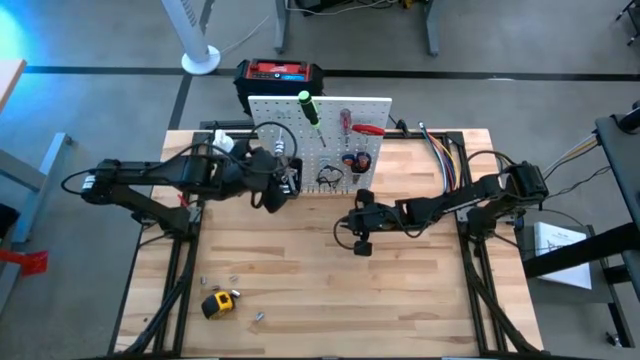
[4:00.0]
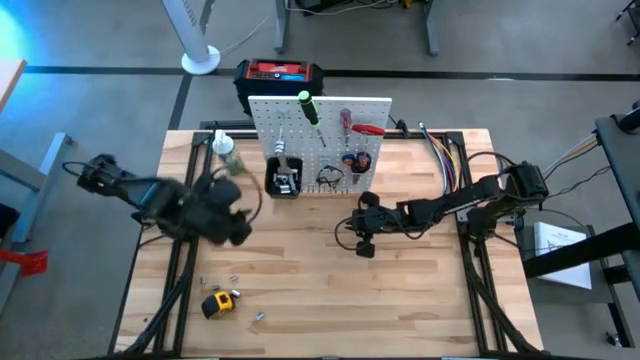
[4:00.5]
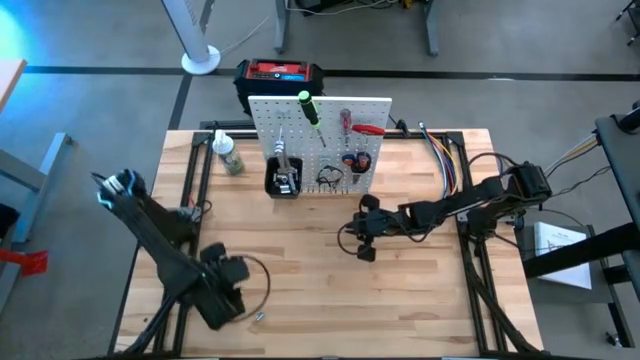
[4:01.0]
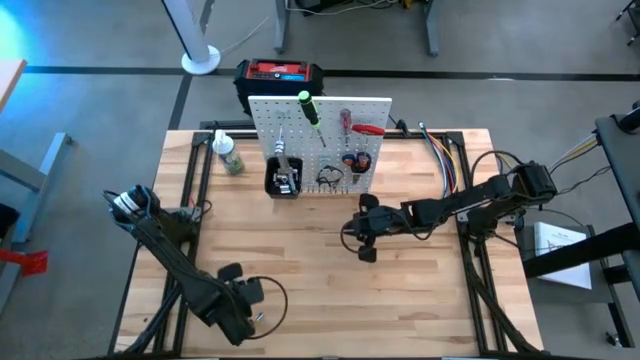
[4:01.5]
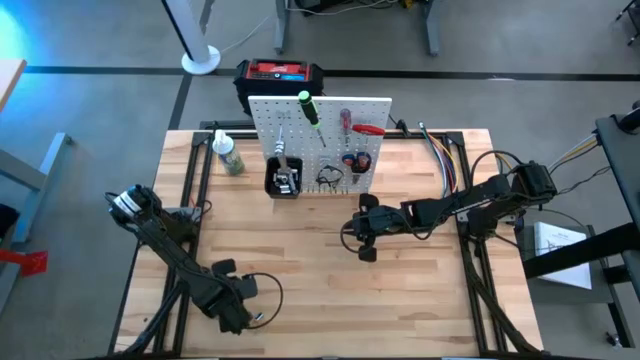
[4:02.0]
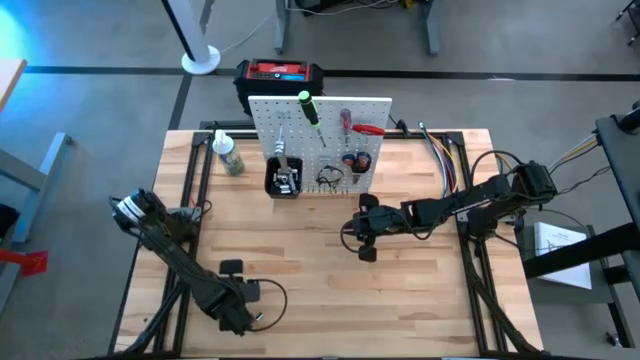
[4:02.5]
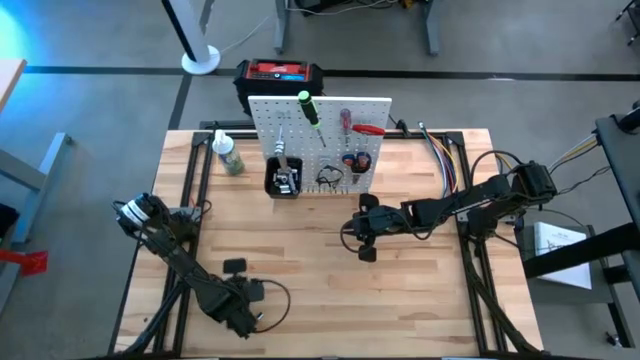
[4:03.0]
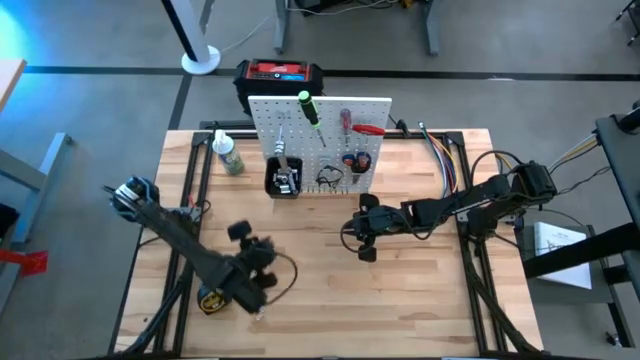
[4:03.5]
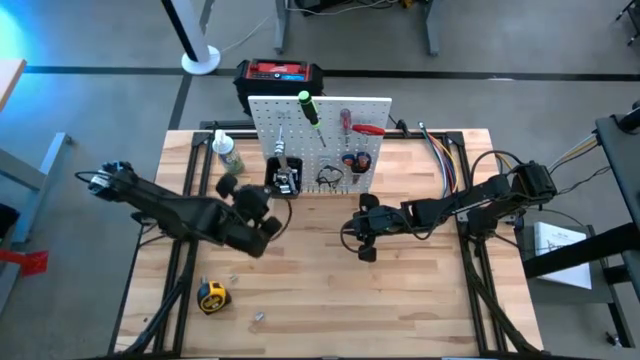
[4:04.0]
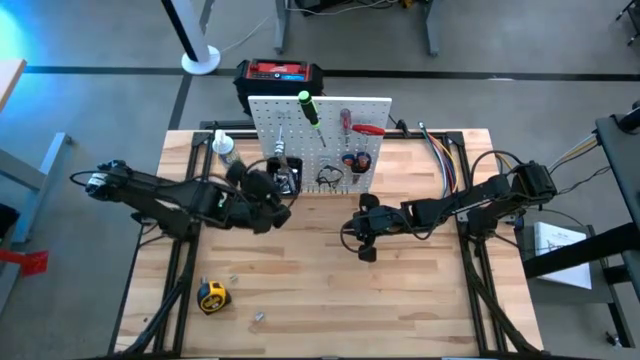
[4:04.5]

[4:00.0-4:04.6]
Task: Hang tools onto peg board
Put the silver socket into the black bin on the pegboard

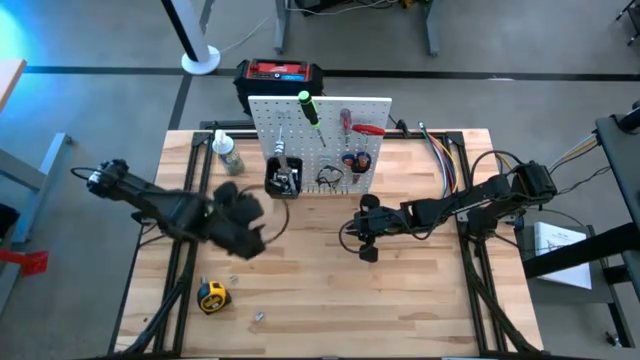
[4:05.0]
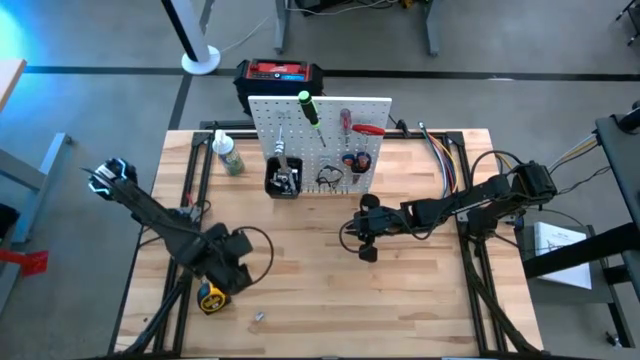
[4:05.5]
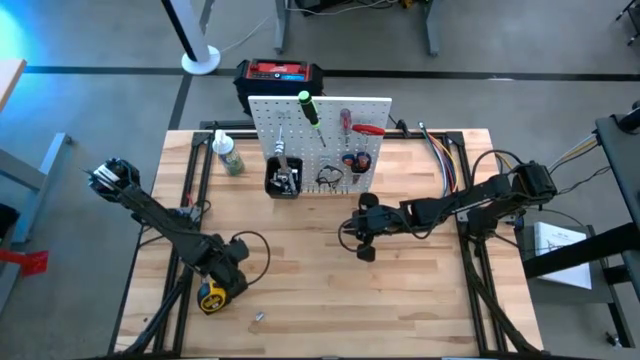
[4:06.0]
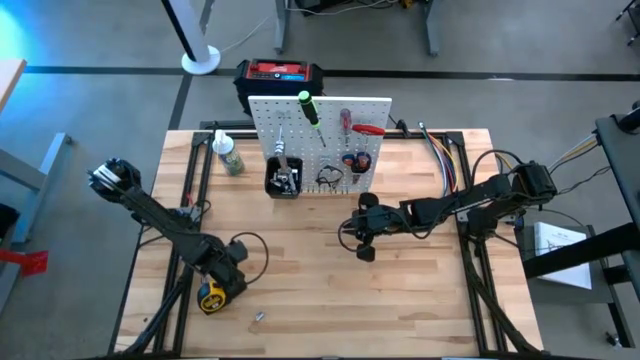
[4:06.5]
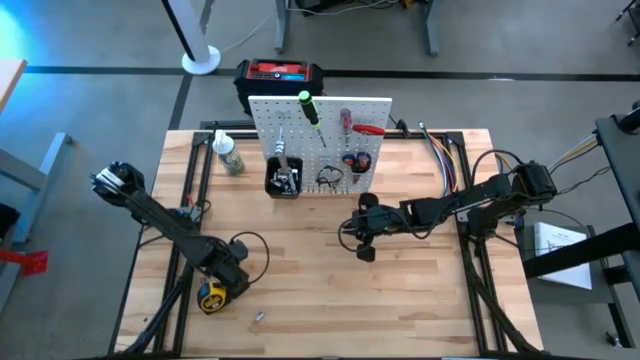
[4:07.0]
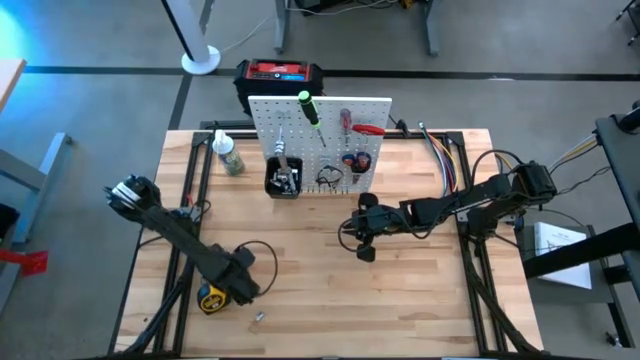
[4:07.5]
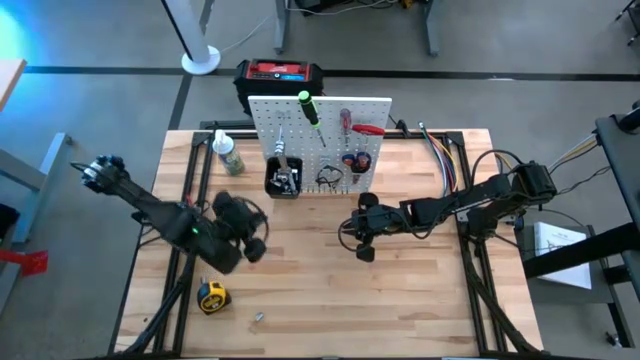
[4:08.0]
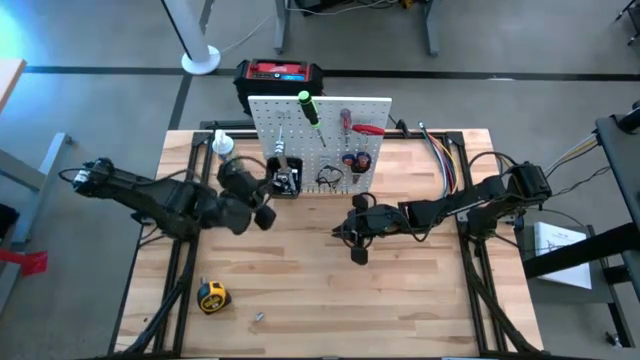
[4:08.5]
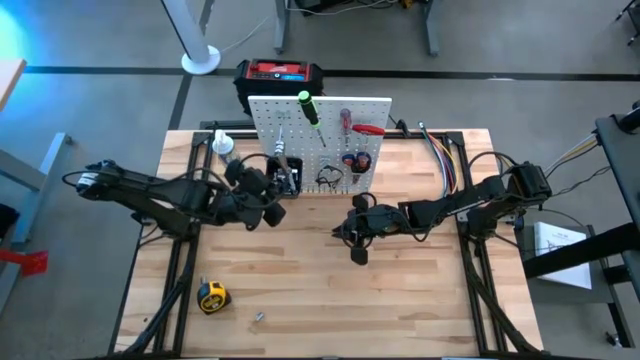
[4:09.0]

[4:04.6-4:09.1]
Put the silver socket into the black bin on the pegboard

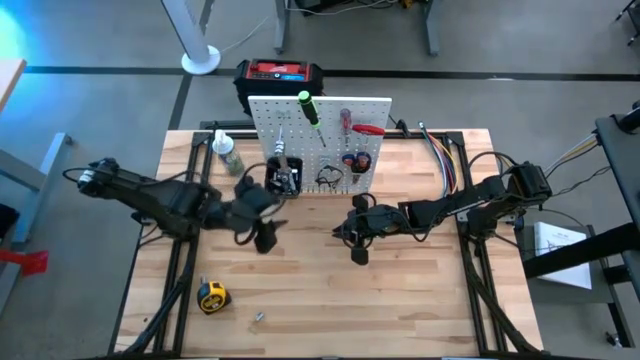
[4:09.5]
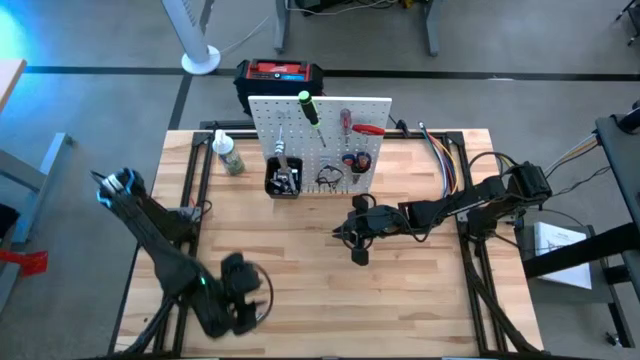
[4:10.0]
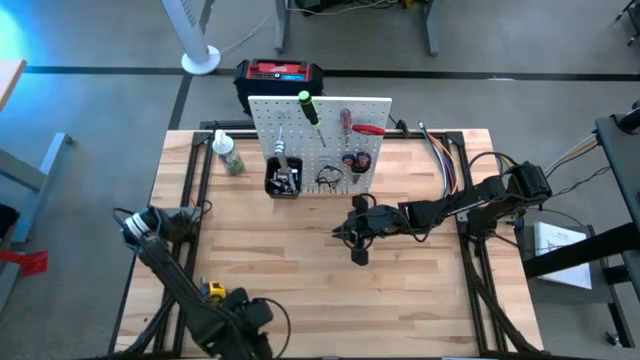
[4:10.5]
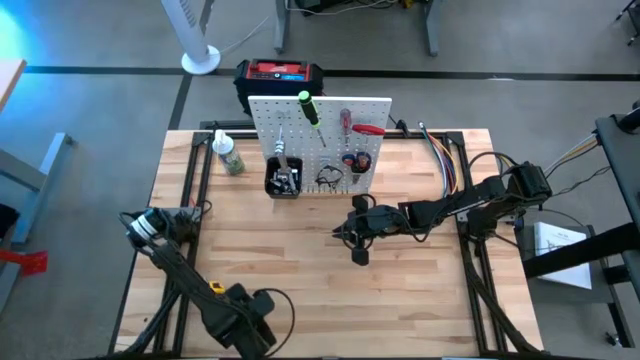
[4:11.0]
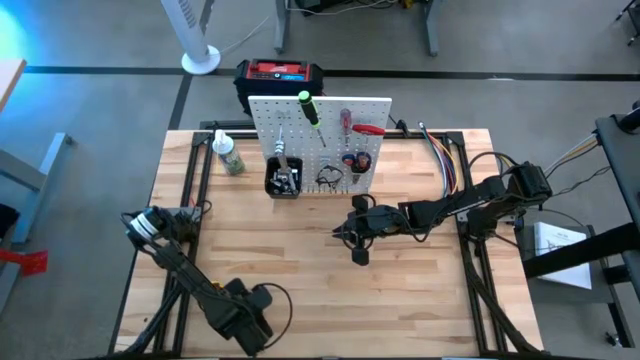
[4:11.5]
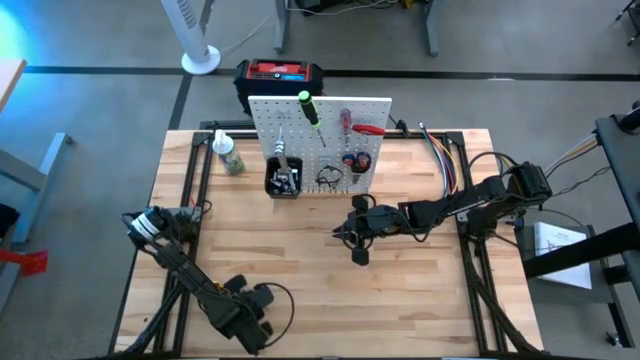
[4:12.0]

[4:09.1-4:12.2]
Put the silver socket into the black bin on the pegboard

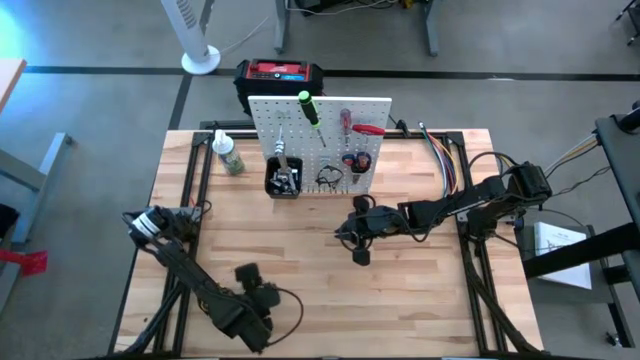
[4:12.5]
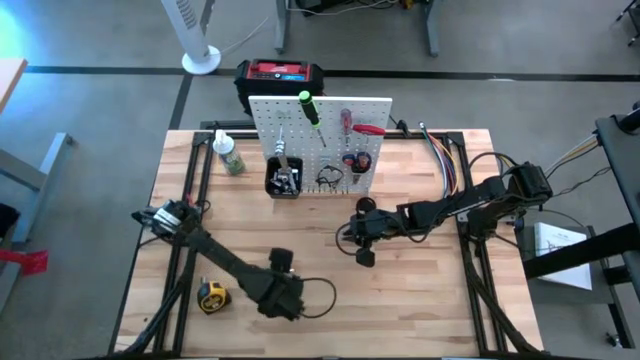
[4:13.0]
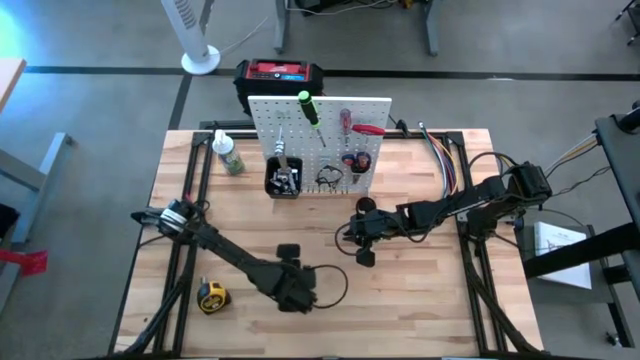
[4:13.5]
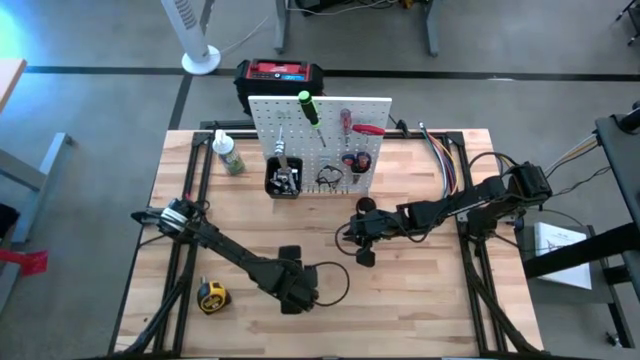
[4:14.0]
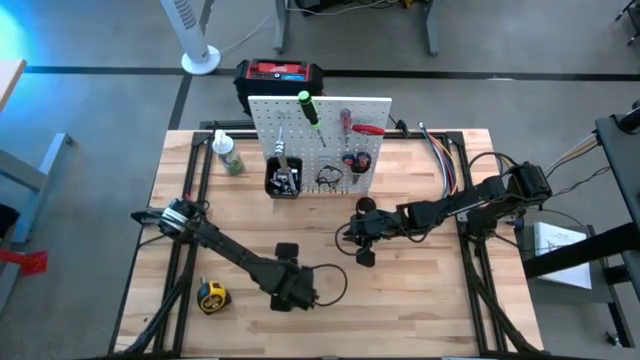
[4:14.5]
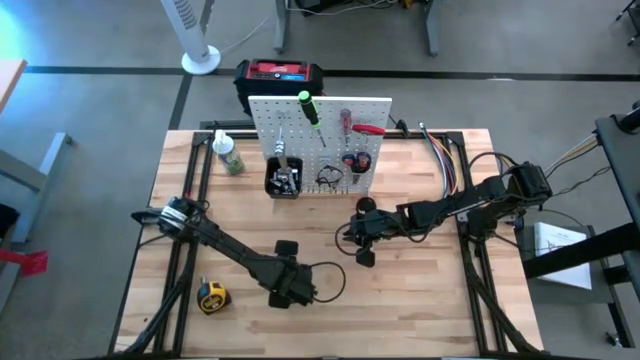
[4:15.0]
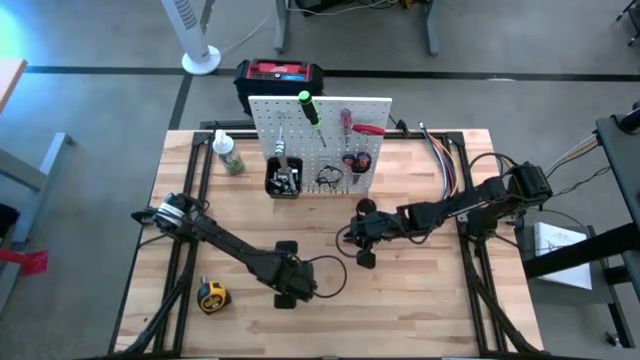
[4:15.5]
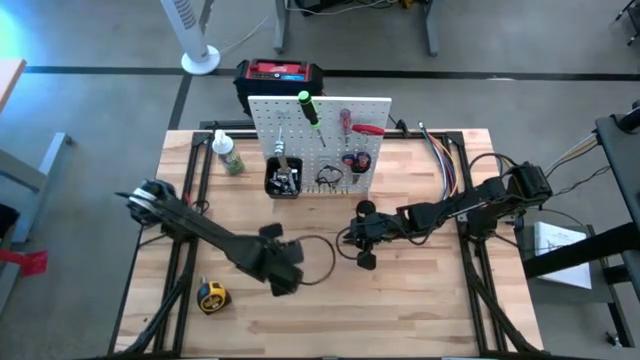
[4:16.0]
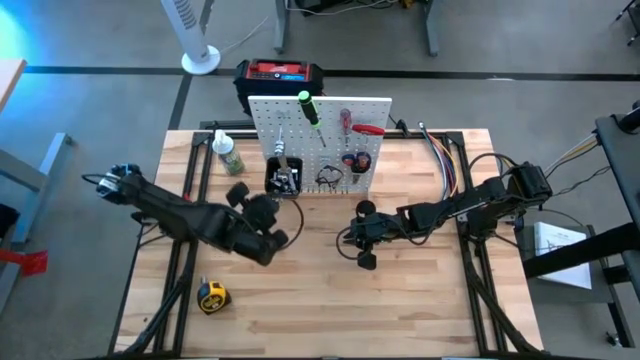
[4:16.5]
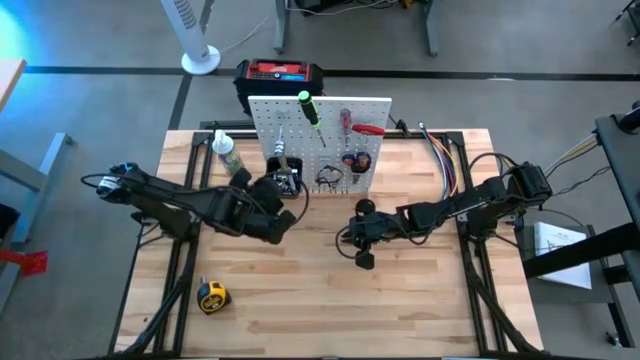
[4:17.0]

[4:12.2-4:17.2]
Put the silver socket into the black bin on the pegboard

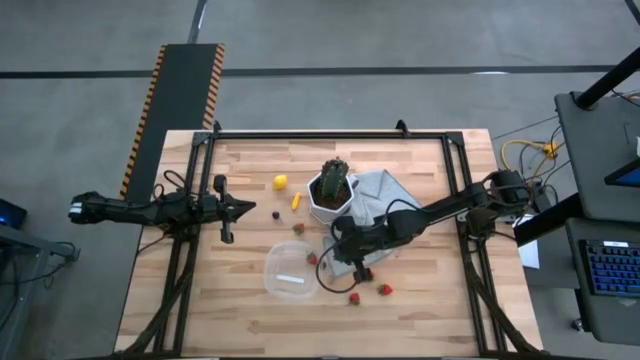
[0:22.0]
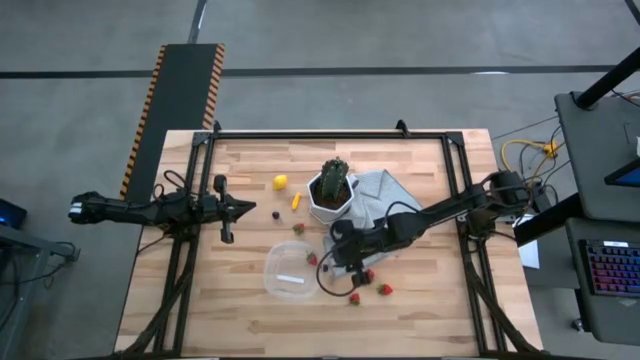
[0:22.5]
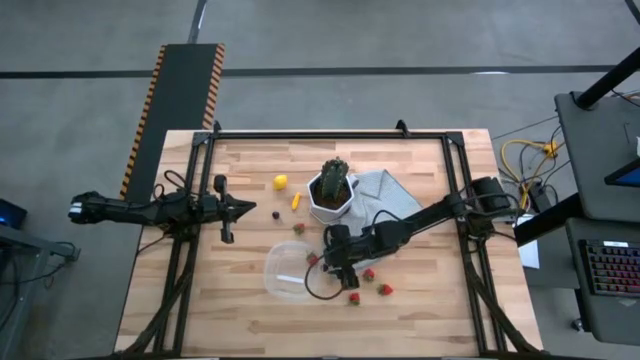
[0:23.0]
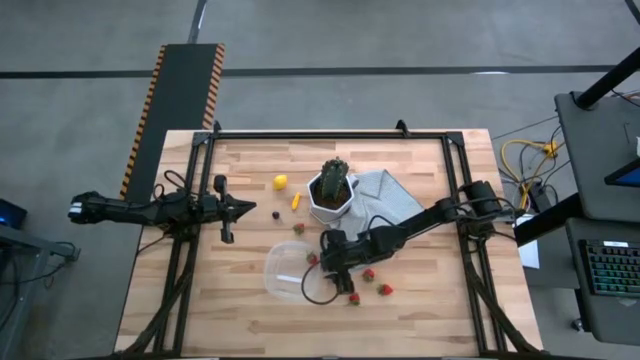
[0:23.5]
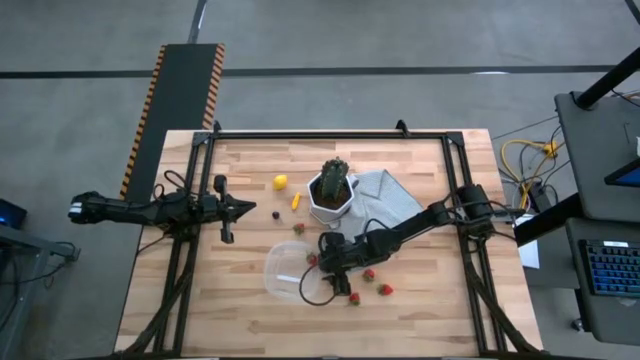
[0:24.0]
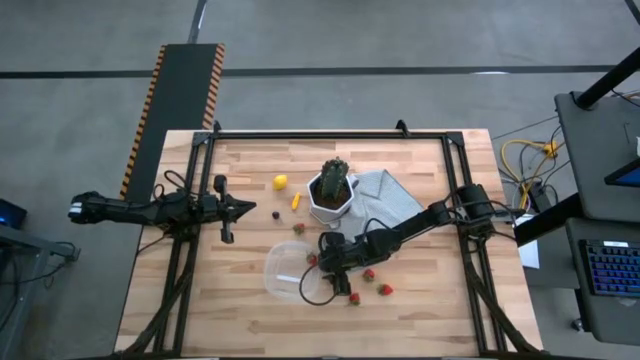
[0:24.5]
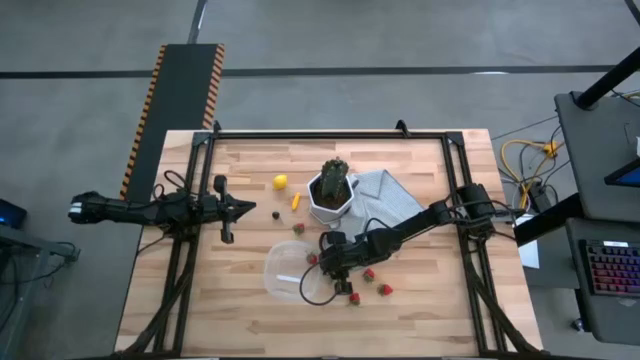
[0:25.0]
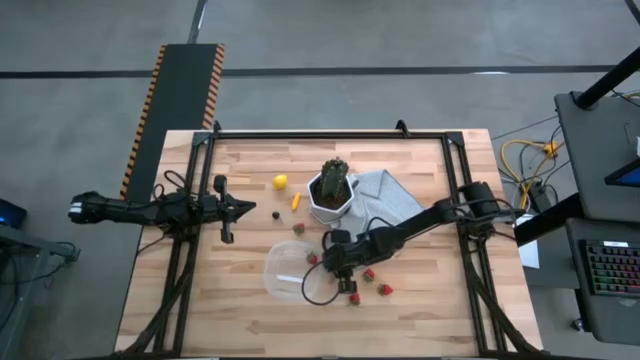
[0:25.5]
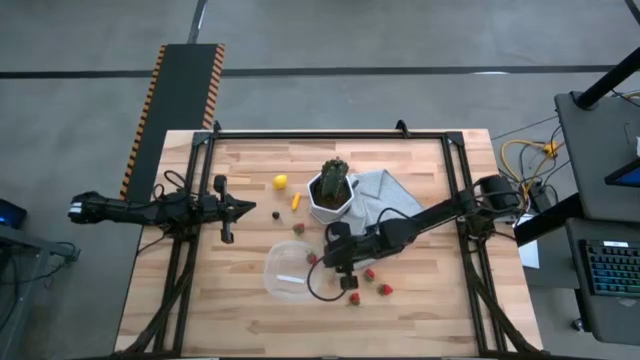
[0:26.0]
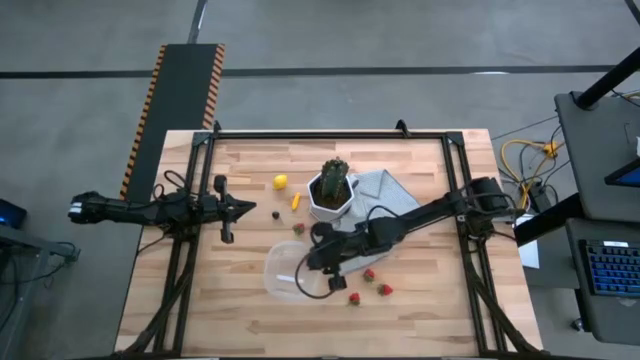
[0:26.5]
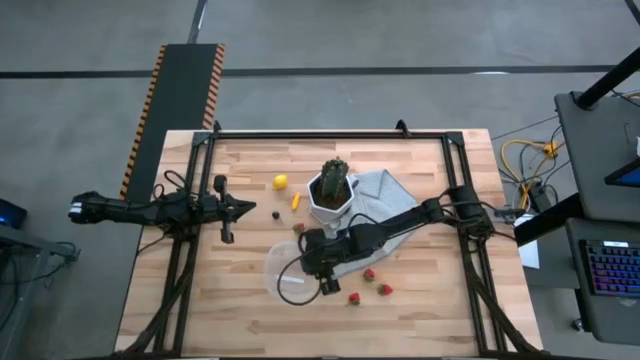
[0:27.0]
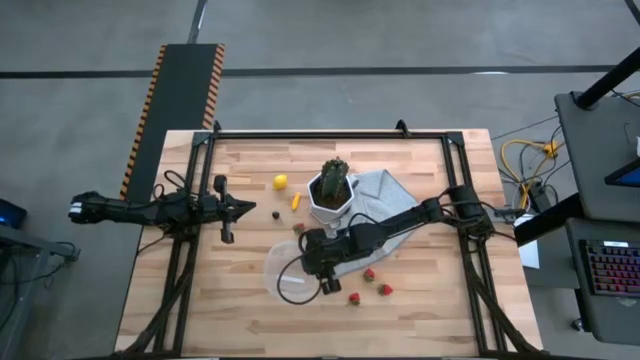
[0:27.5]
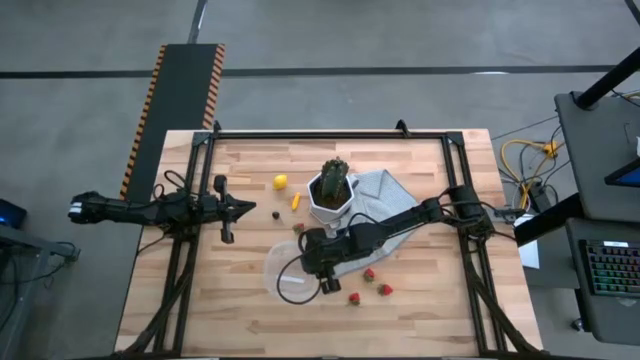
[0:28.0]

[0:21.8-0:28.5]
Task: Pick and placing Produce into tupperware
Put the blackberry into the transparent plastic container
